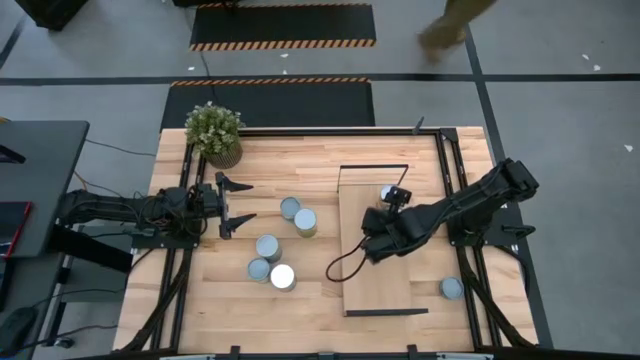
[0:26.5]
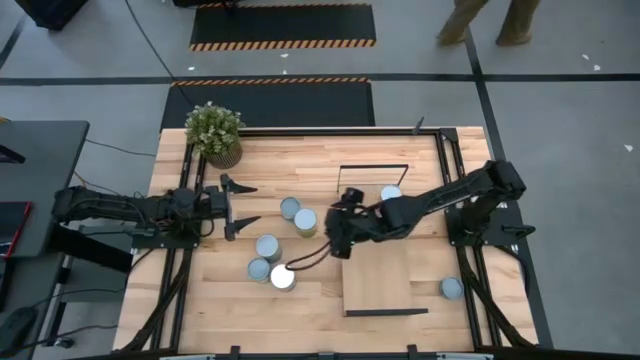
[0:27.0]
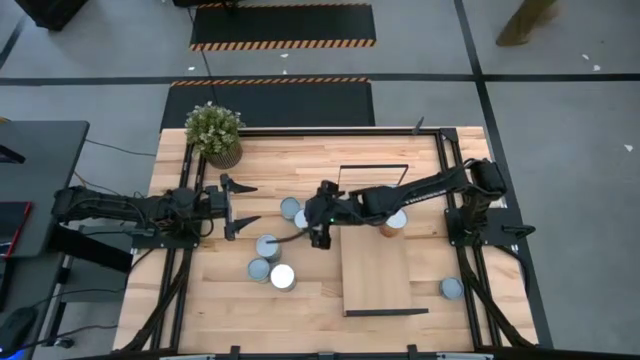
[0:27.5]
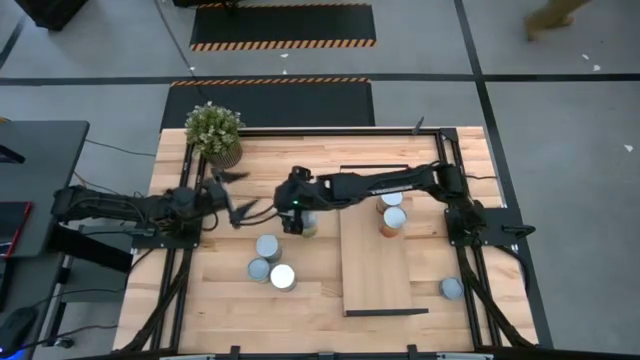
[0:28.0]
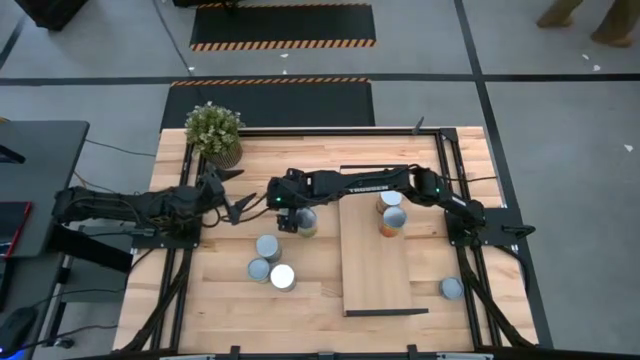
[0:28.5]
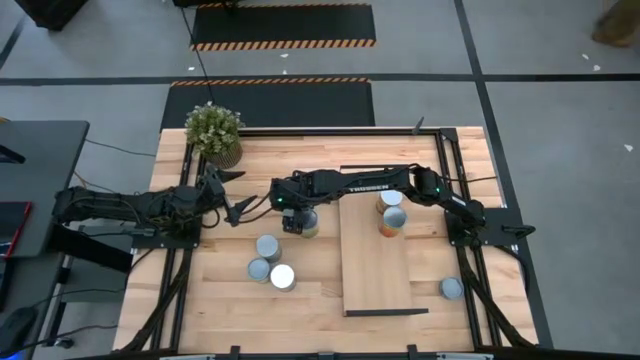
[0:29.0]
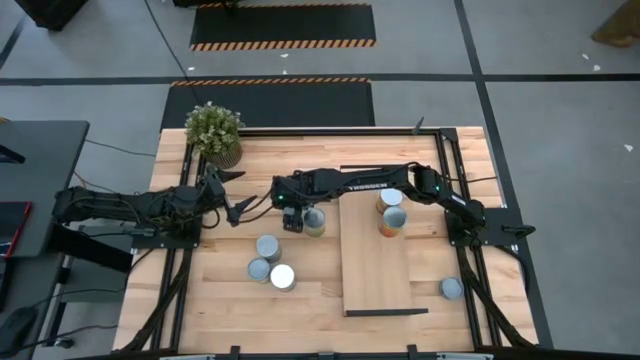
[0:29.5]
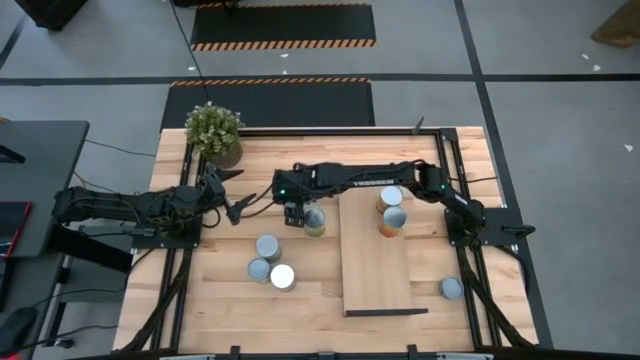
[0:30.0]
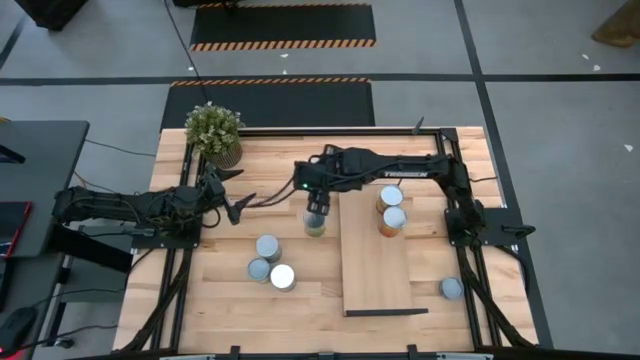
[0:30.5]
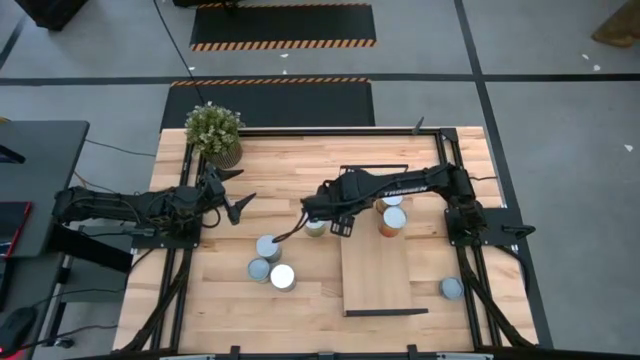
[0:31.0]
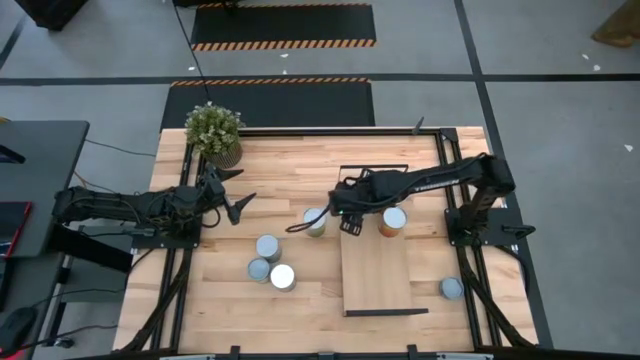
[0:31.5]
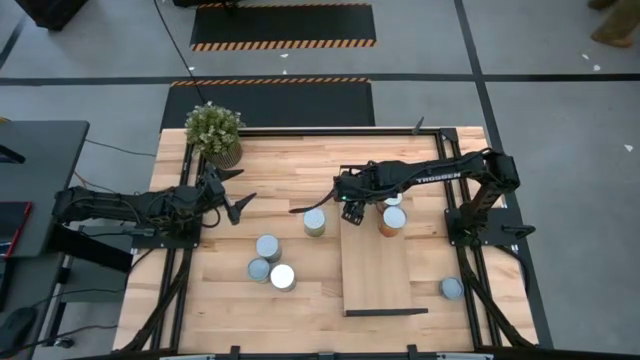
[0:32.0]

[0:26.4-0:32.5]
Task: Pick and place cans onto a shelf
Put the canned mixed vegetable can on the shelf

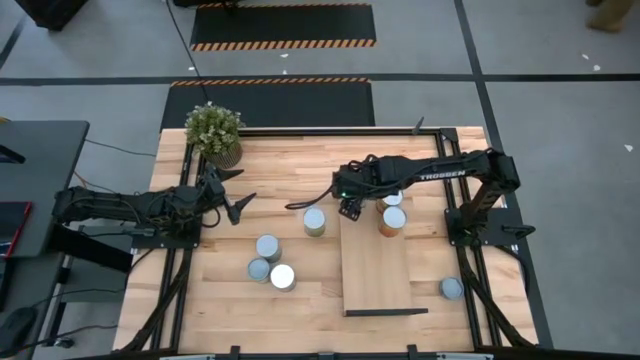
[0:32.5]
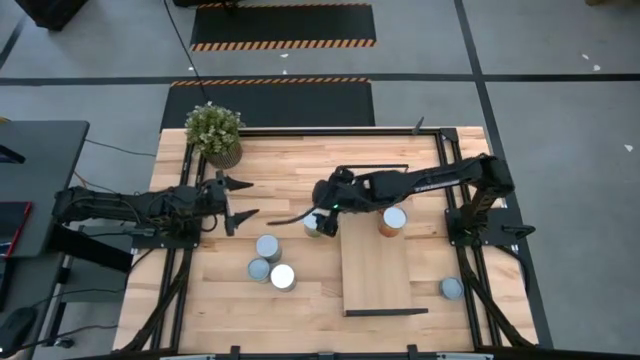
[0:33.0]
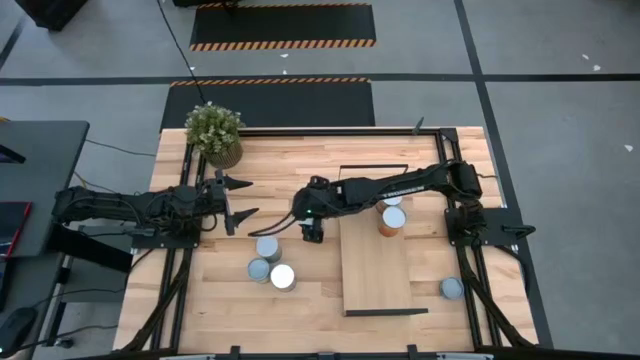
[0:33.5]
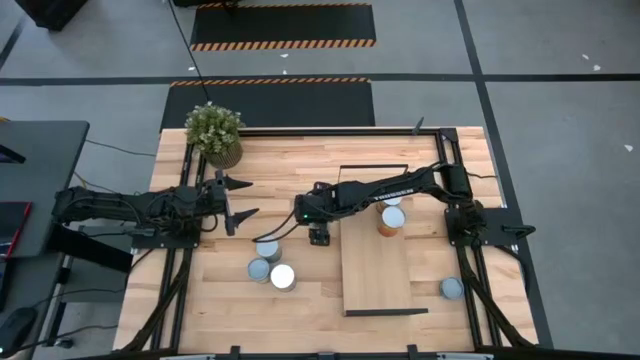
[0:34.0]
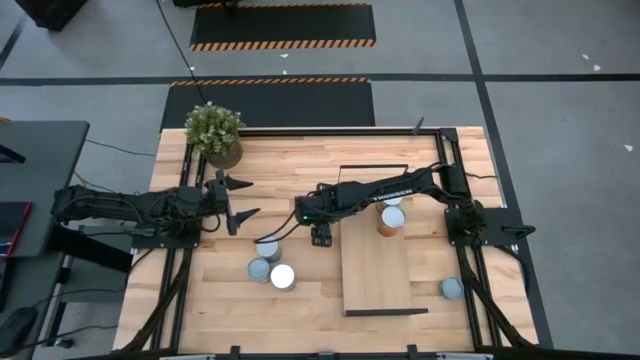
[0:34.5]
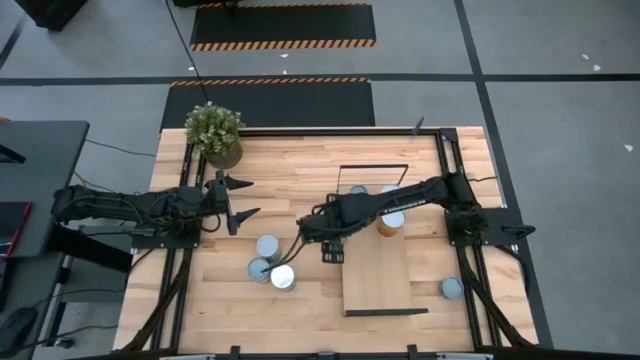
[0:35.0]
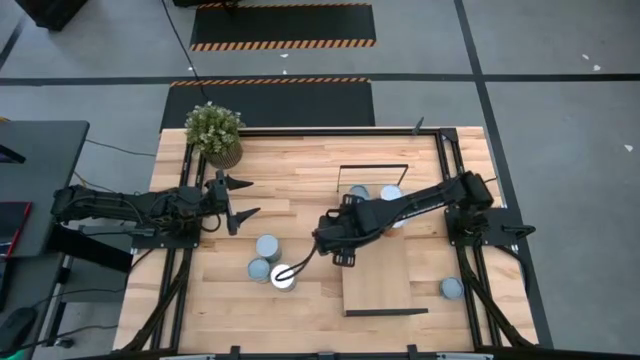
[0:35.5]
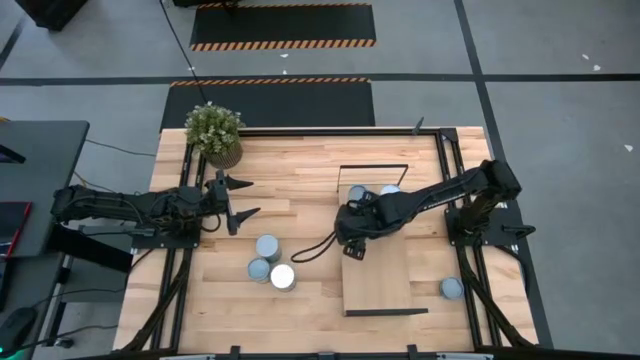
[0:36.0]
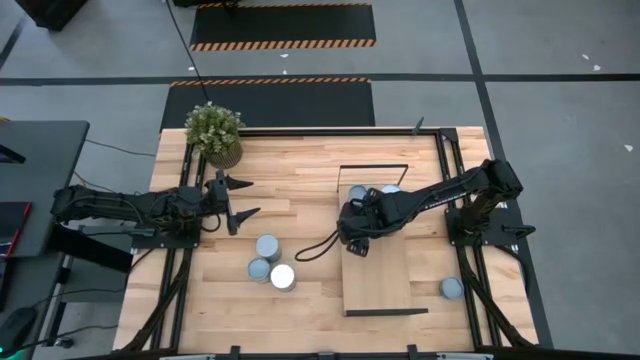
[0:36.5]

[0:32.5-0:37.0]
Put the canned oranges can on the shelf

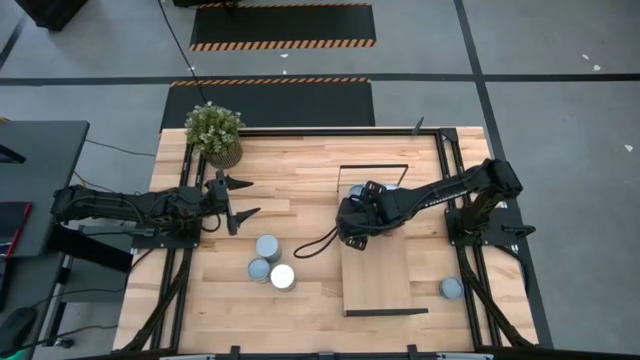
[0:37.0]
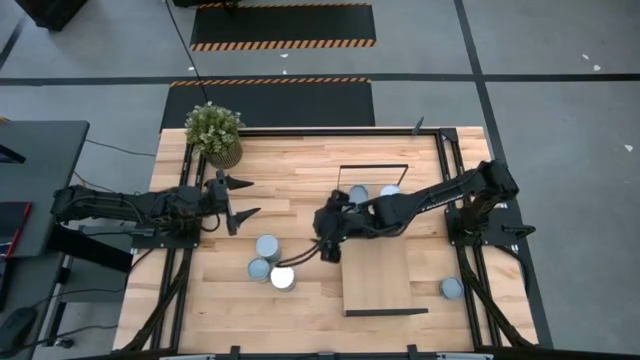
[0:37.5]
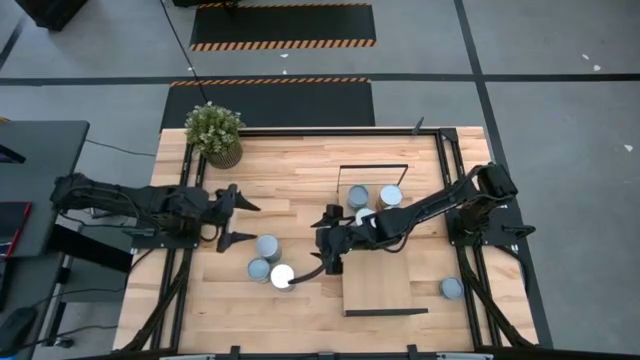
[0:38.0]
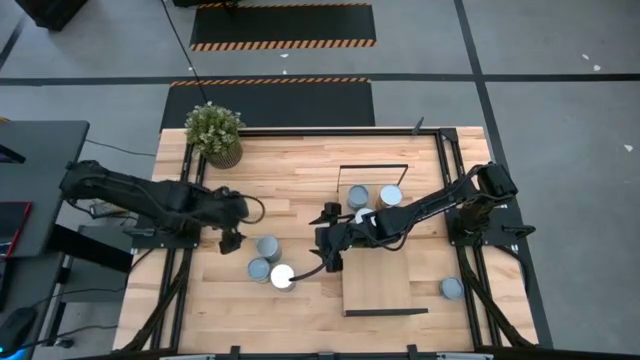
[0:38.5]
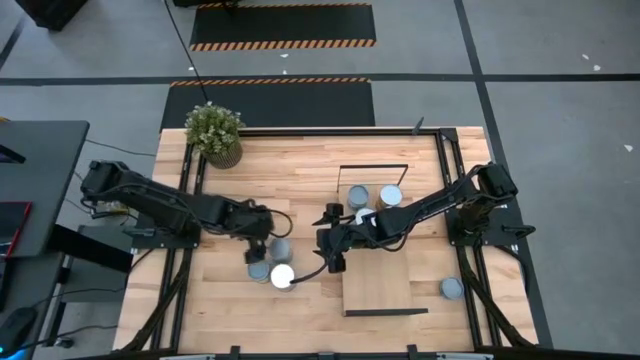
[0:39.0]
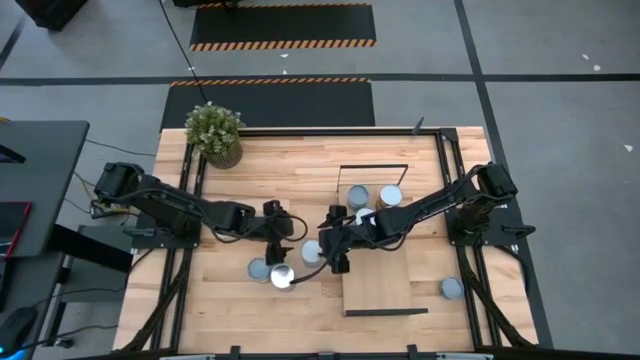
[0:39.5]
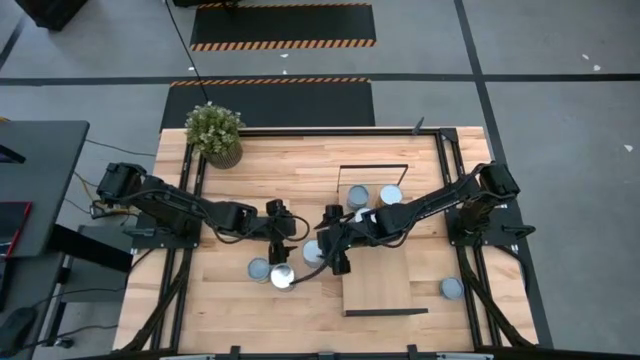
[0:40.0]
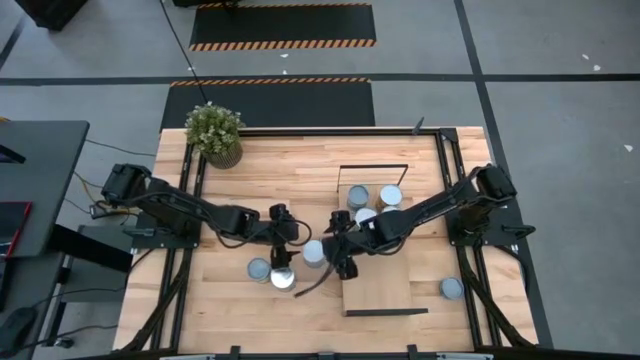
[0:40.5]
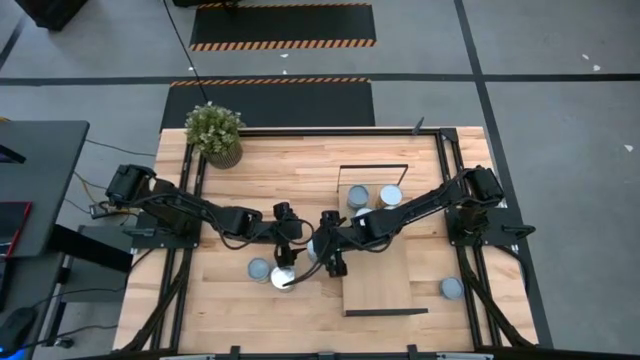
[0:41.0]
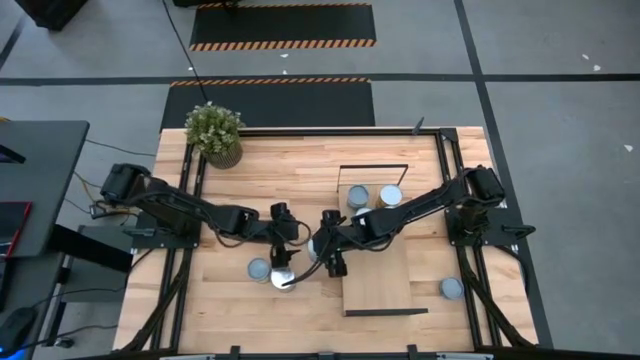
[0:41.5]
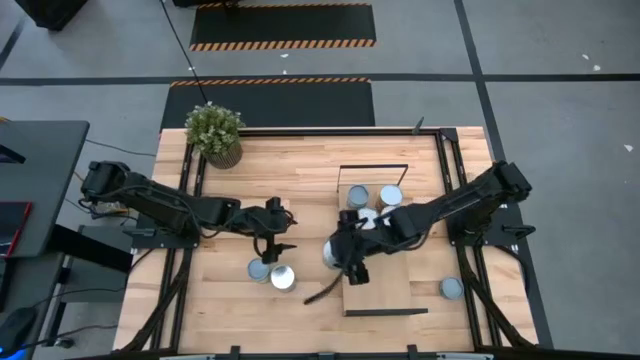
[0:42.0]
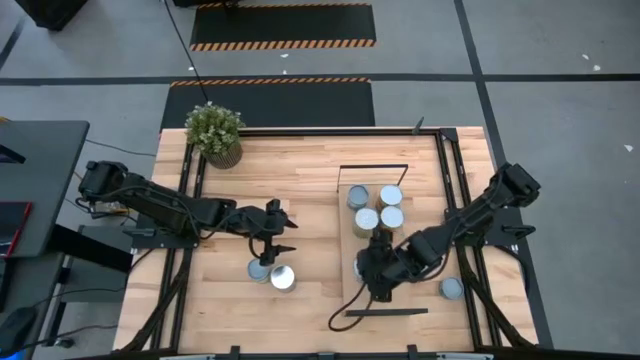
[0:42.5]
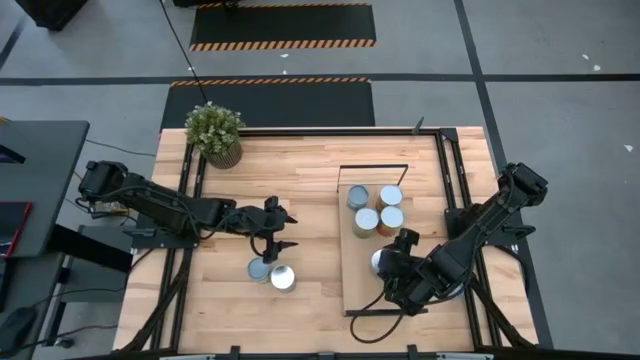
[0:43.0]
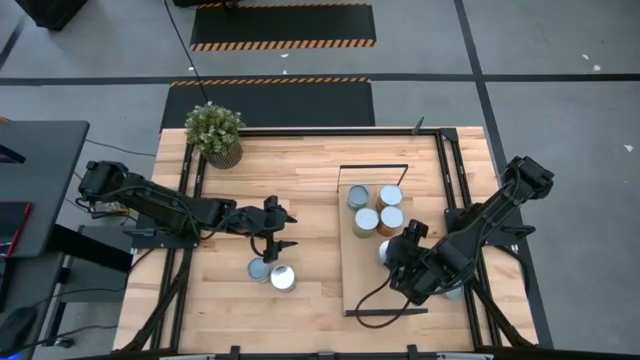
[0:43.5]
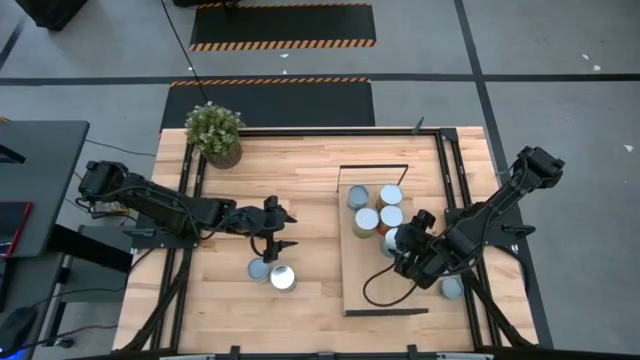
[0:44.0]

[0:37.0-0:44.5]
Put the canned cherries can on the shelf

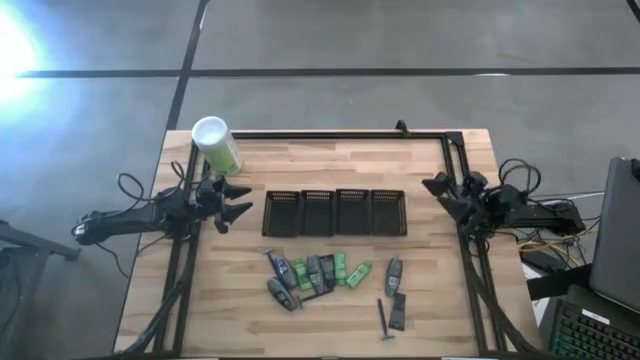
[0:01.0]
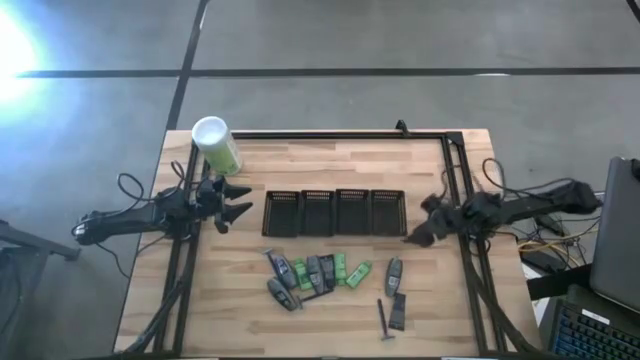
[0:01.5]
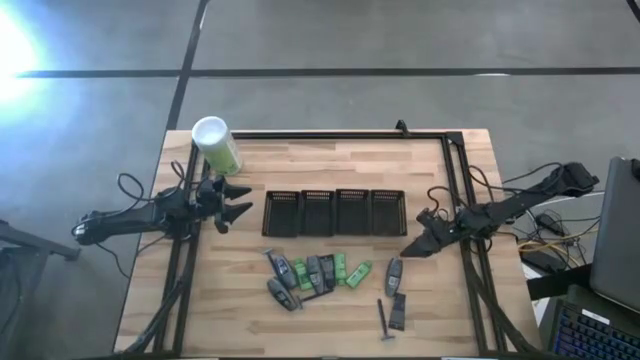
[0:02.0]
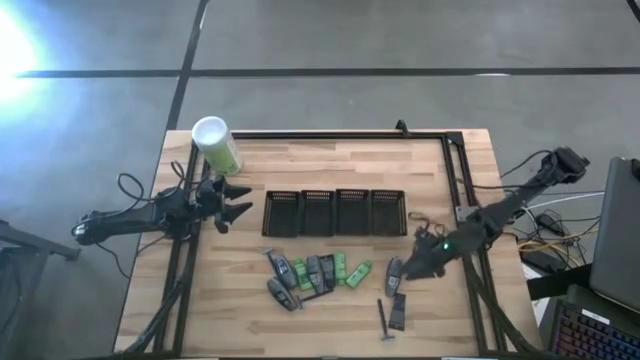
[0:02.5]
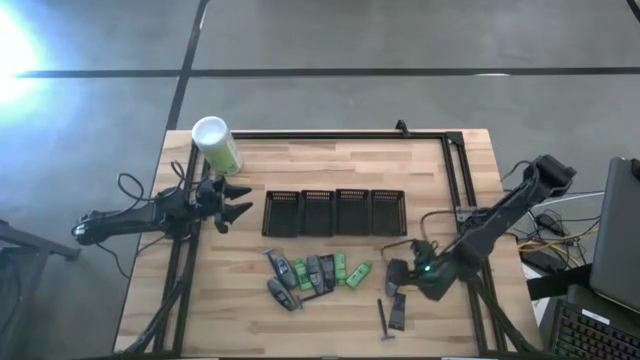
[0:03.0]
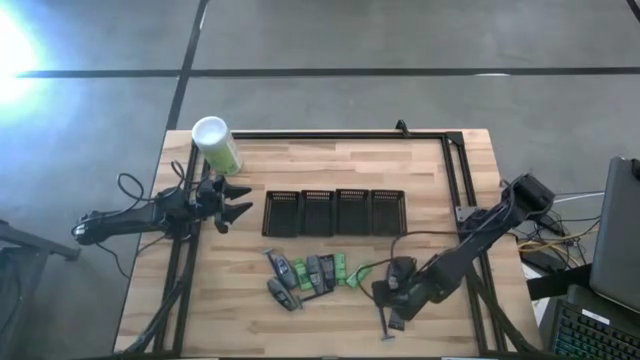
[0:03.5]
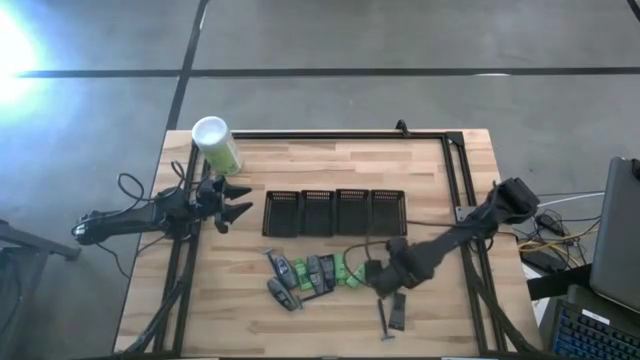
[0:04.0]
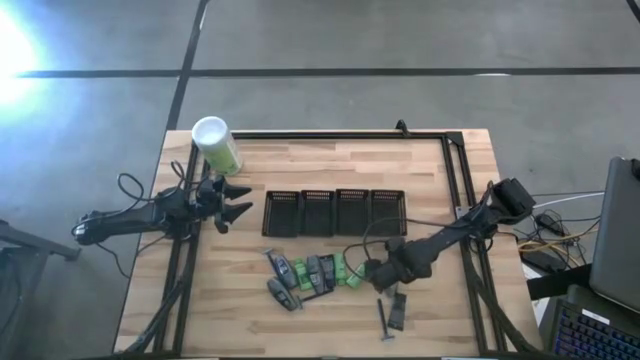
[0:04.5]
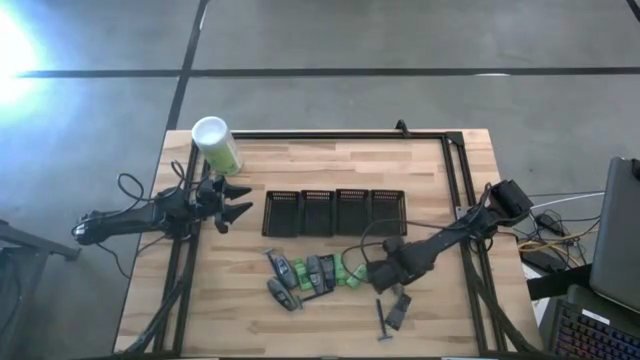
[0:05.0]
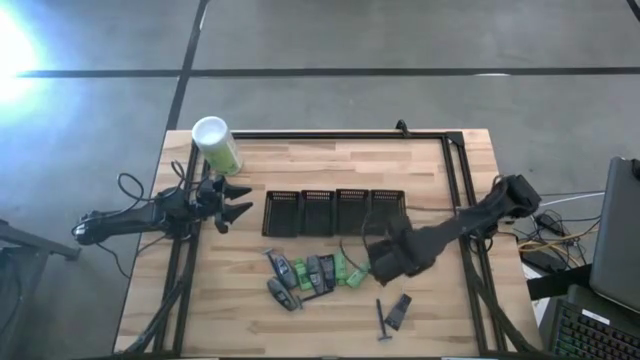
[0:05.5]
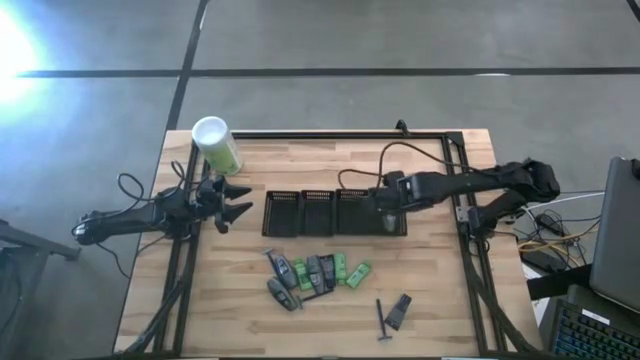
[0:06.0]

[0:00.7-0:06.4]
Task: Pick & Place Travel size toiletries
Put the gray deodorant into the right black basket
